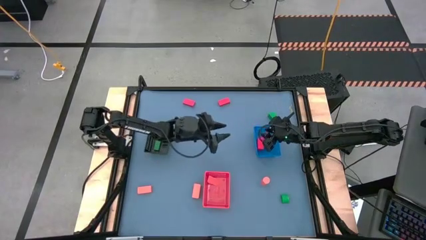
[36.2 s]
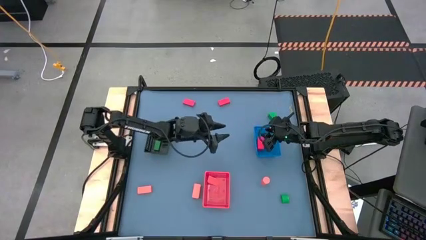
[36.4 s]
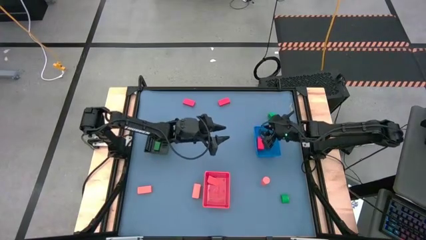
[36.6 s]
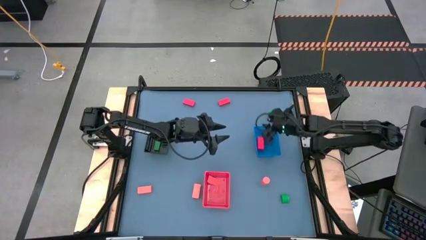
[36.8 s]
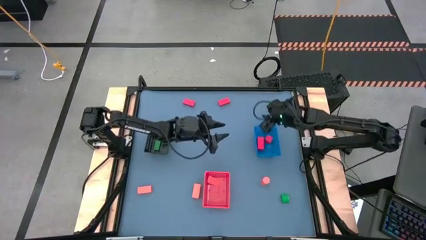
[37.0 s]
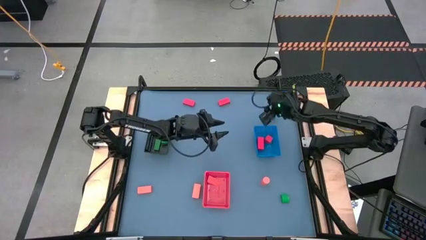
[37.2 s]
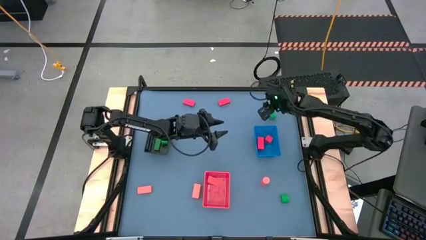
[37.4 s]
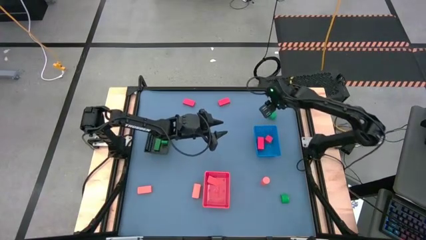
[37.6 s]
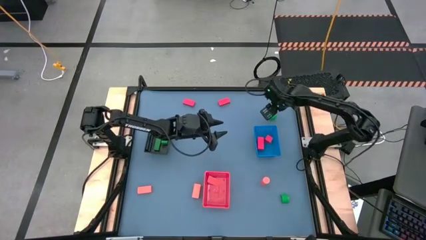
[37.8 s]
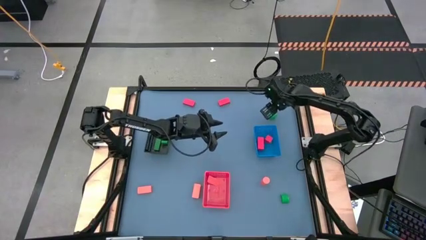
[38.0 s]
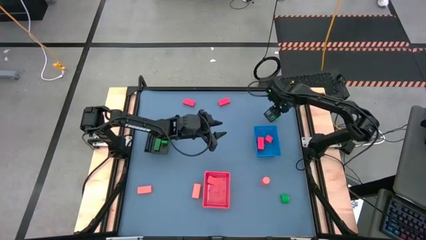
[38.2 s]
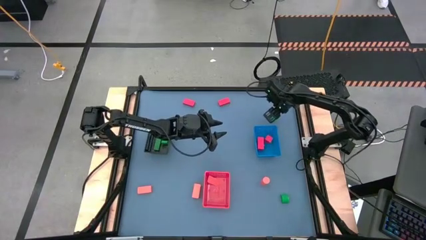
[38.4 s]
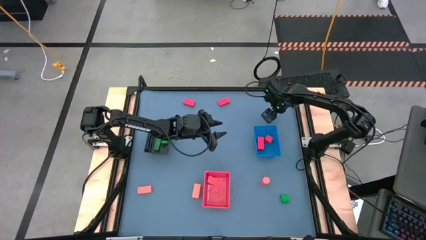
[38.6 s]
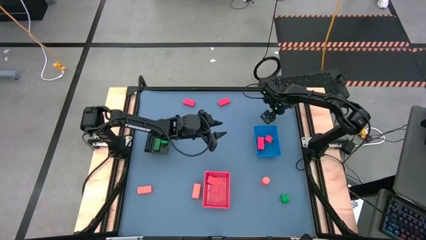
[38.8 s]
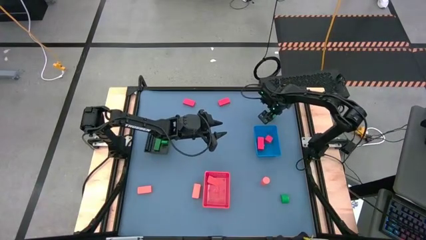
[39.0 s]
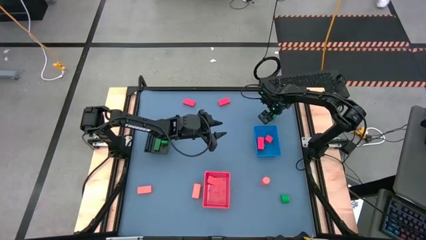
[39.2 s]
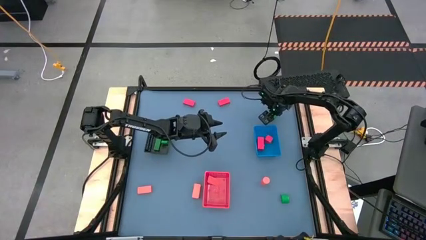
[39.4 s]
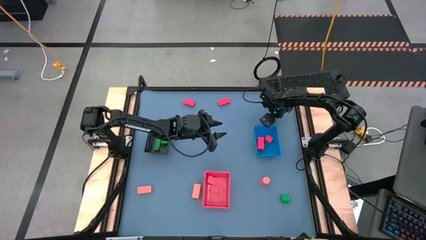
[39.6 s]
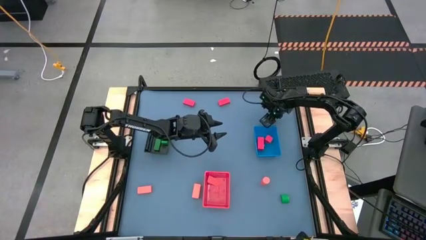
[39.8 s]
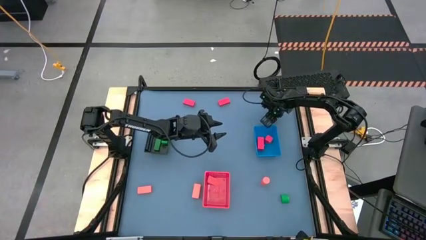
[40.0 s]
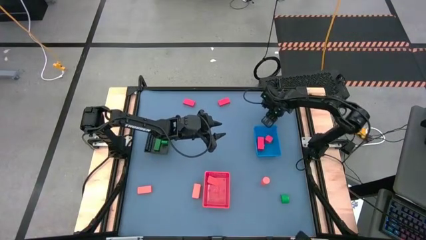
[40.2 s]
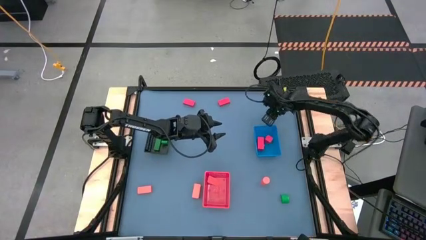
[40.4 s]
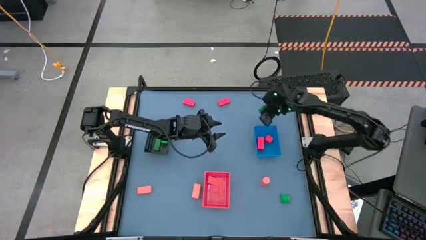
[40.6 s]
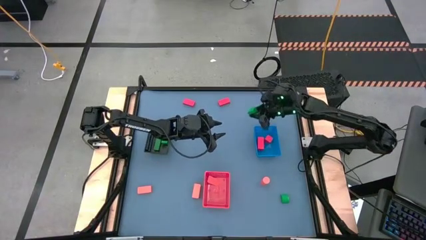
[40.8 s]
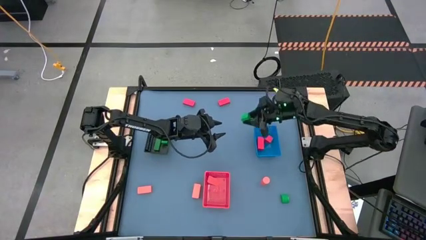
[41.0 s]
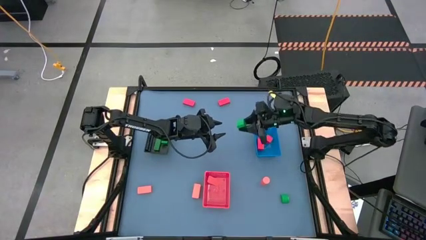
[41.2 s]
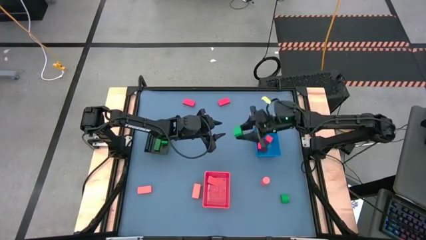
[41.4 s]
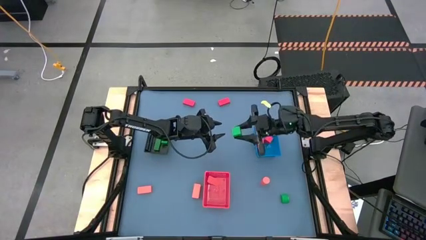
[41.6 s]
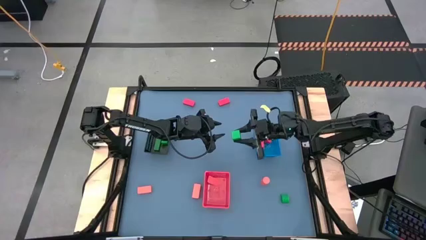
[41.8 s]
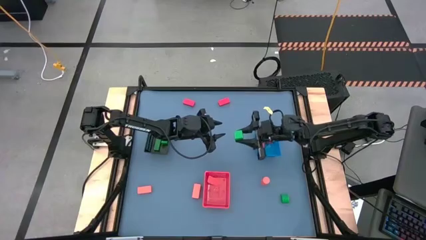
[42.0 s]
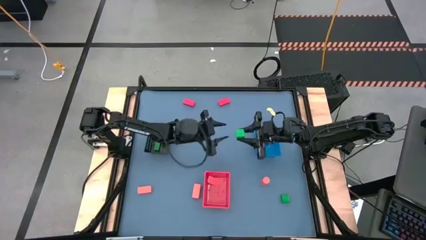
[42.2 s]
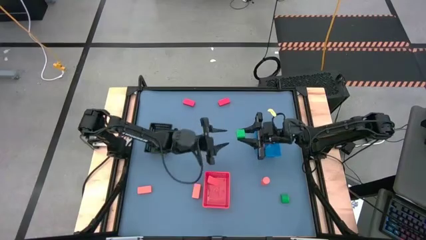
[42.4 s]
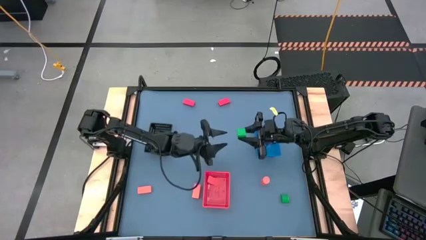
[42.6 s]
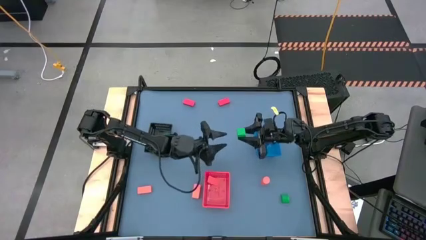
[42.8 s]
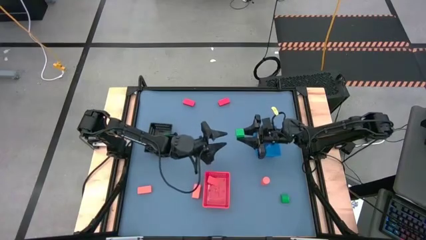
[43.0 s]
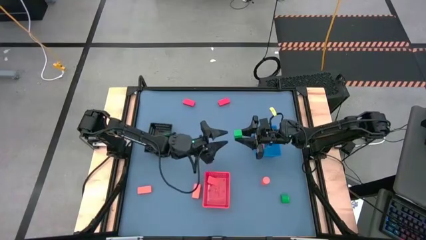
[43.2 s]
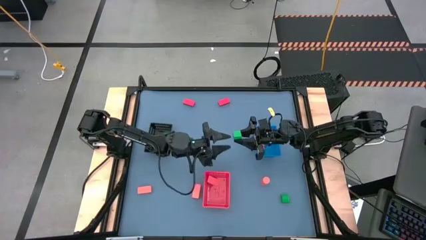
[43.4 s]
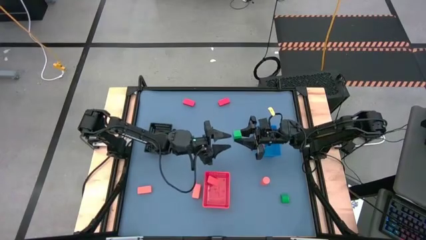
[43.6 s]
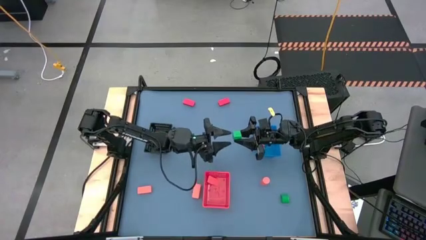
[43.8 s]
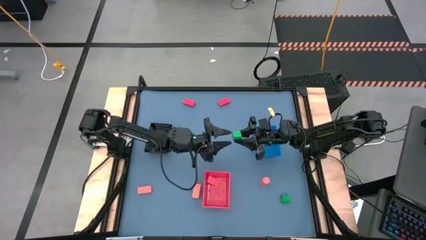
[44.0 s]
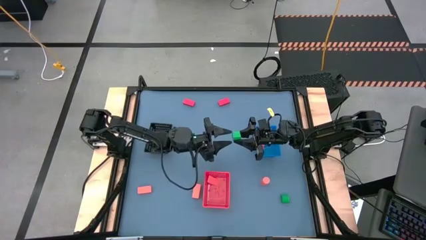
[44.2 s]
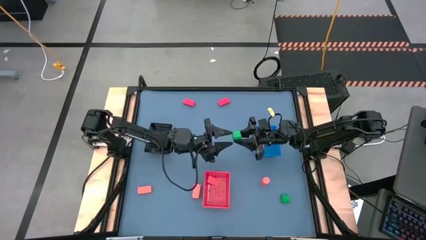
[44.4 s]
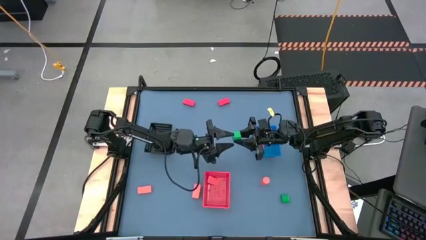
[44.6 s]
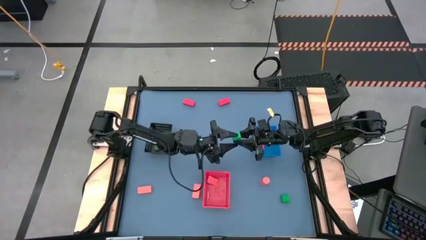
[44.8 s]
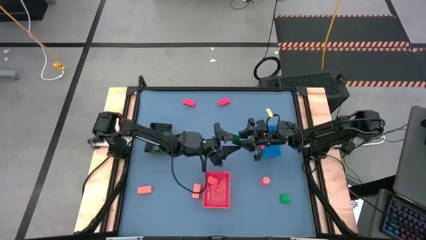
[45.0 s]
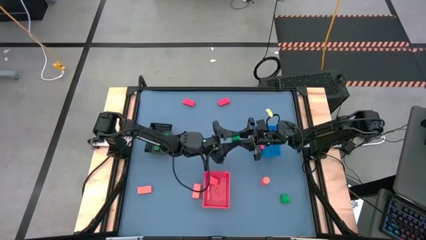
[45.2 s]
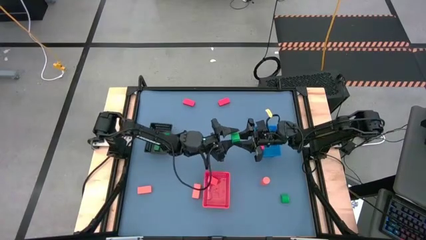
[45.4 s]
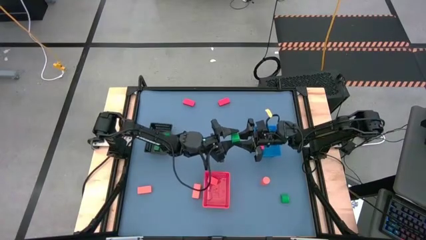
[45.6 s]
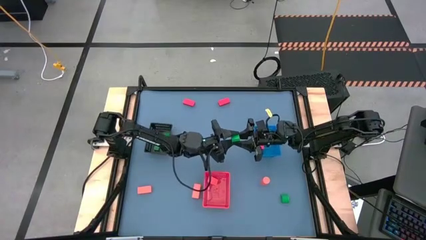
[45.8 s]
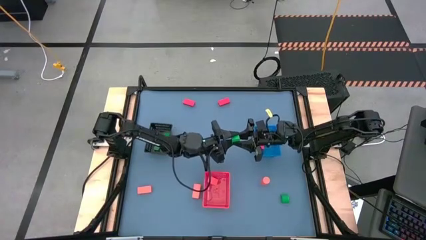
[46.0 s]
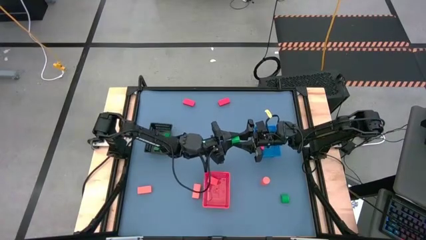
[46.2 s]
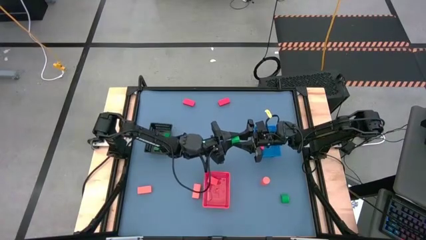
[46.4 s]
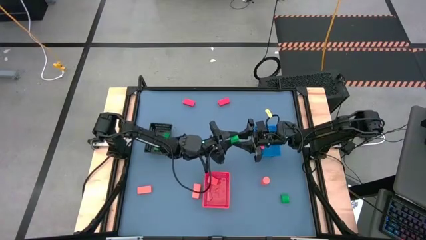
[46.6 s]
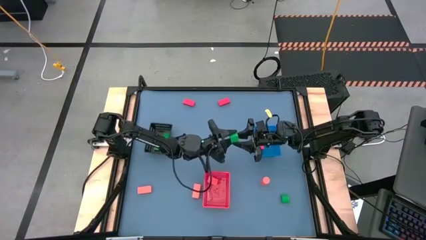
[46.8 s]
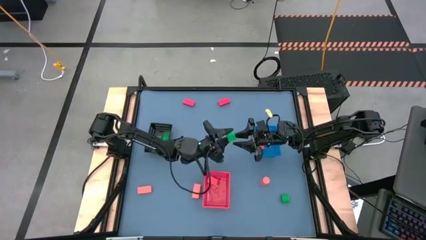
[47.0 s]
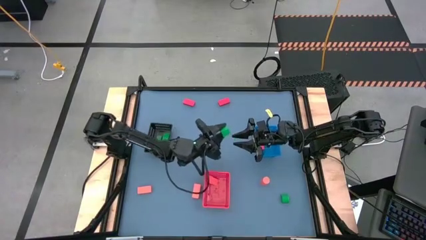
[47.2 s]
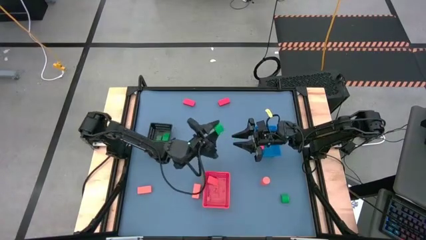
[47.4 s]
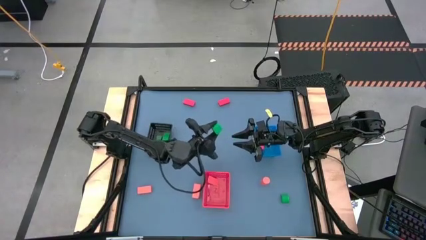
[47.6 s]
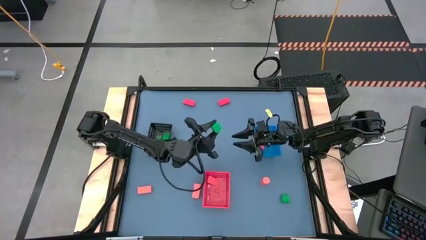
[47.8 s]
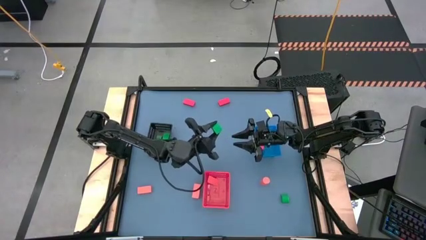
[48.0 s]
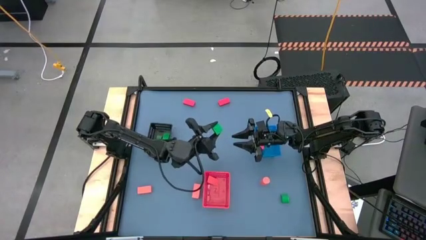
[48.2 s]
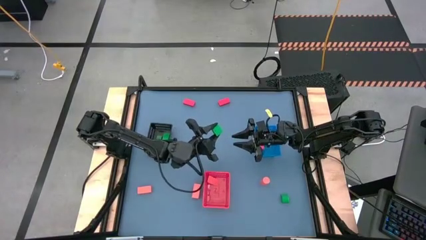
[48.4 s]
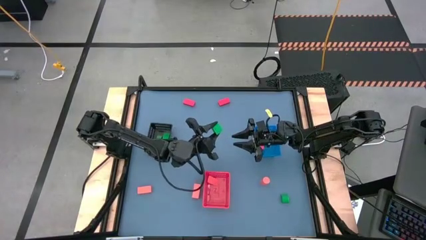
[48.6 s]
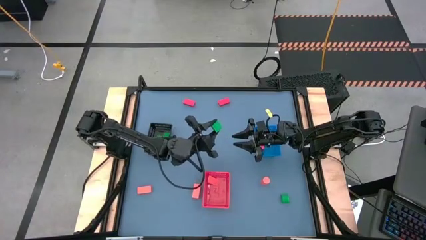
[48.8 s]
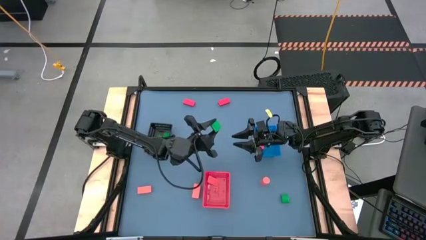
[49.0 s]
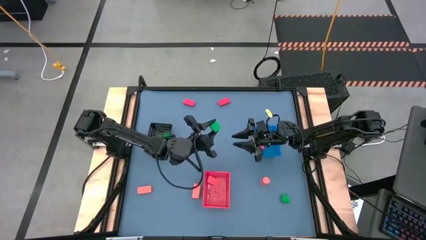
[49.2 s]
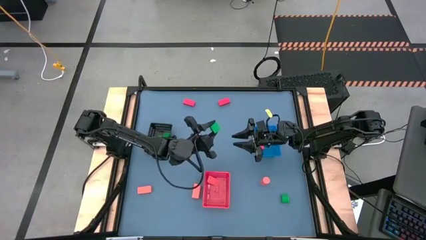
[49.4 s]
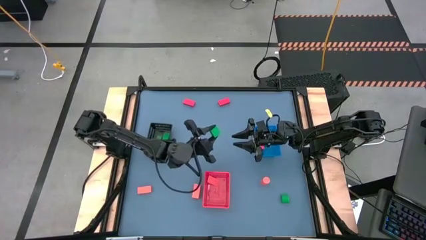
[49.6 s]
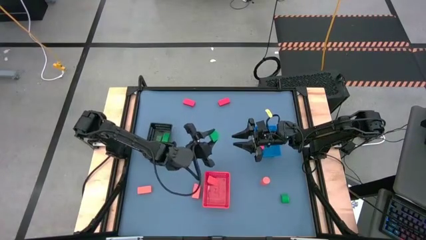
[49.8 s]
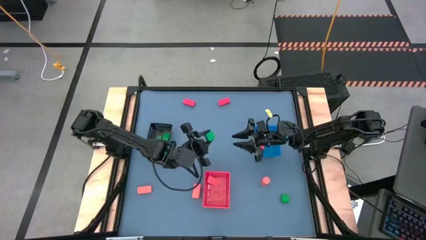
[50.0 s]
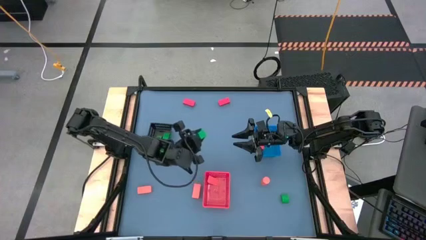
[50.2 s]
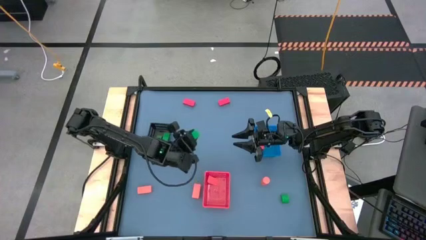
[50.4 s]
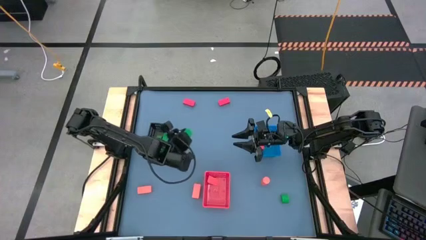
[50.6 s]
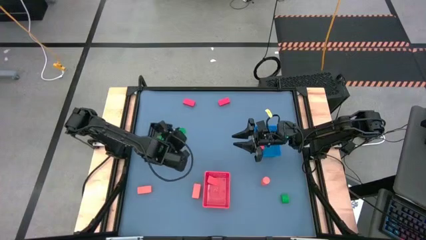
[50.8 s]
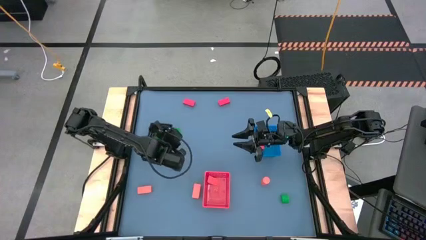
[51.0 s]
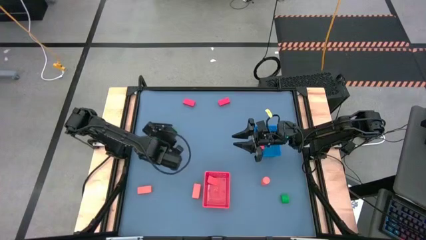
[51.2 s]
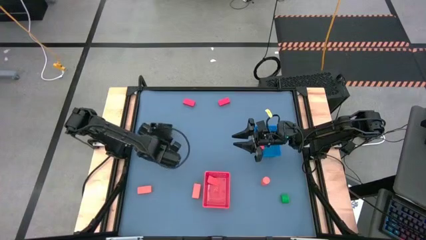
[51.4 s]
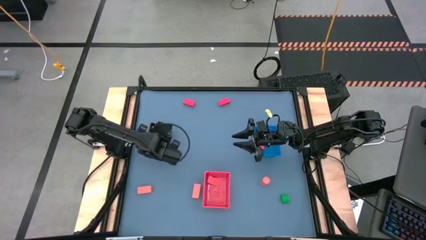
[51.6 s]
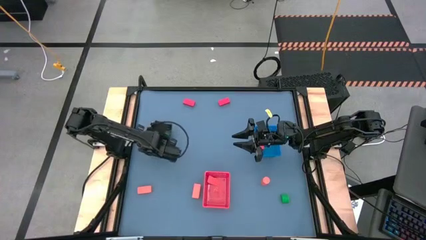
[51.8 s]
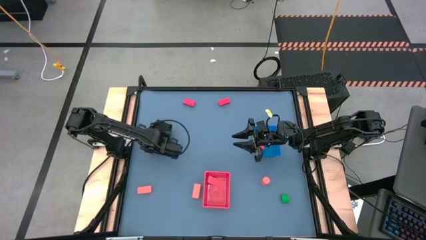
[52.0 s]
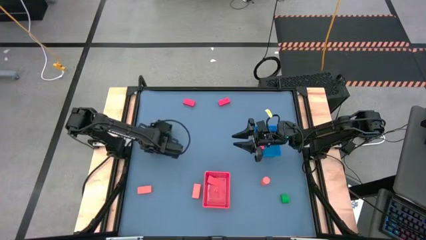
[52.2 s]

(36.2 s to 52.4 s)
Task: Sort & place blocks by color
Put the green block into the black bin
